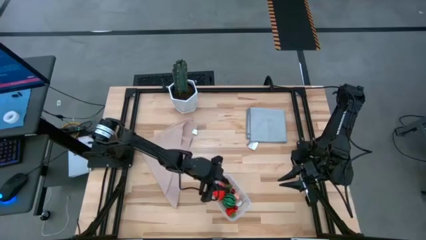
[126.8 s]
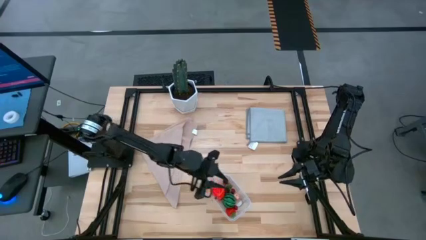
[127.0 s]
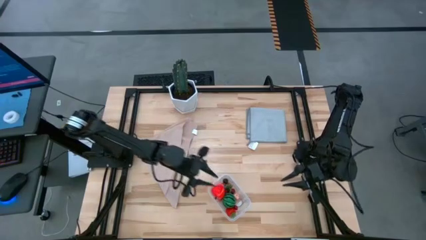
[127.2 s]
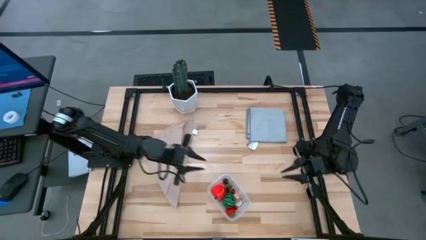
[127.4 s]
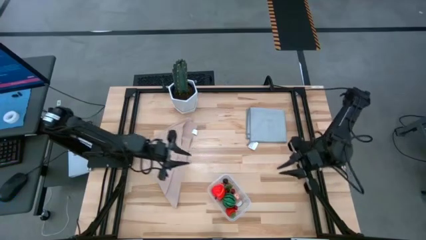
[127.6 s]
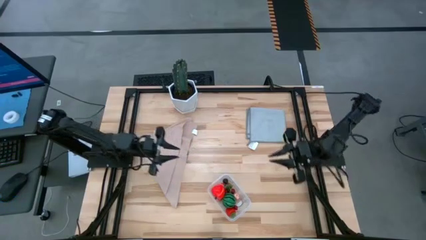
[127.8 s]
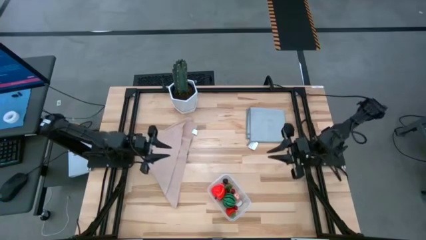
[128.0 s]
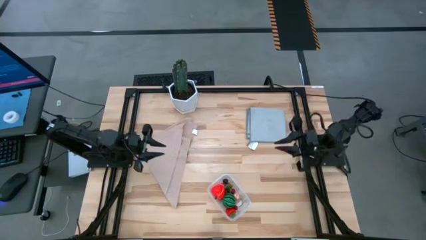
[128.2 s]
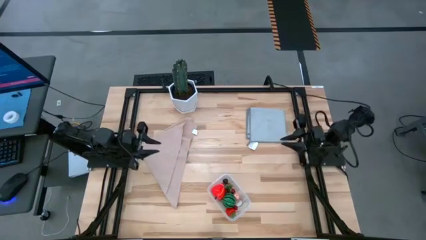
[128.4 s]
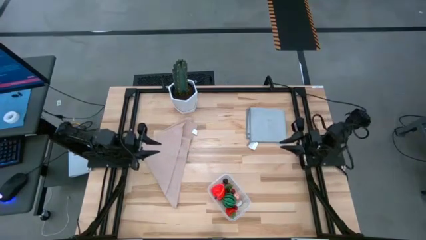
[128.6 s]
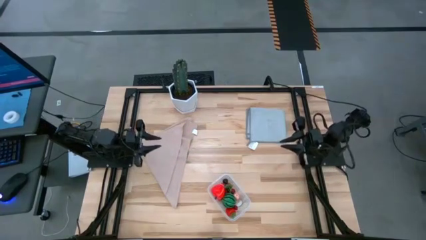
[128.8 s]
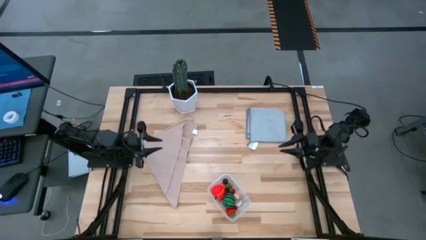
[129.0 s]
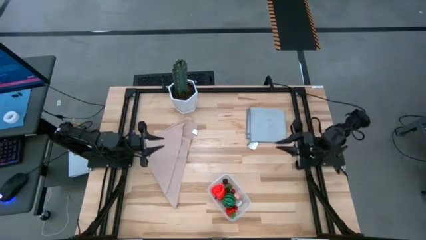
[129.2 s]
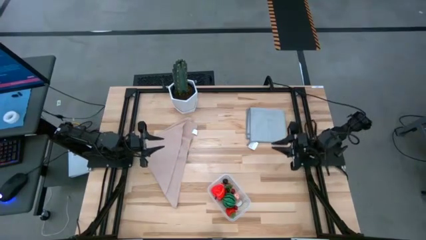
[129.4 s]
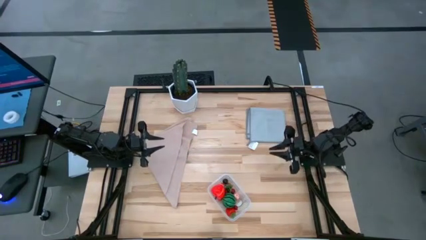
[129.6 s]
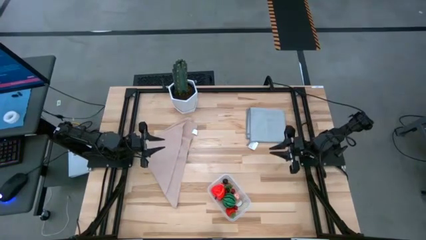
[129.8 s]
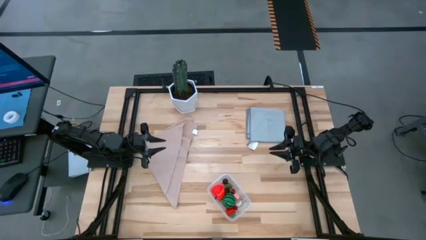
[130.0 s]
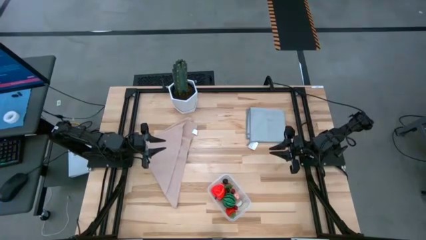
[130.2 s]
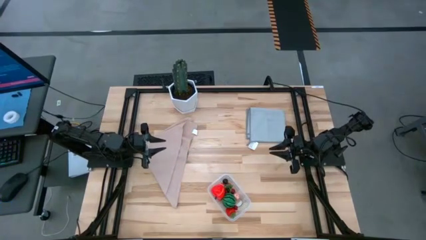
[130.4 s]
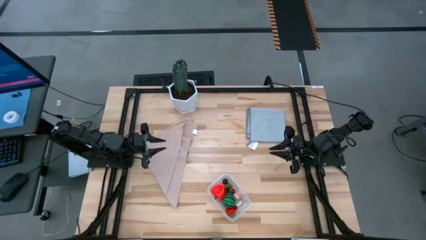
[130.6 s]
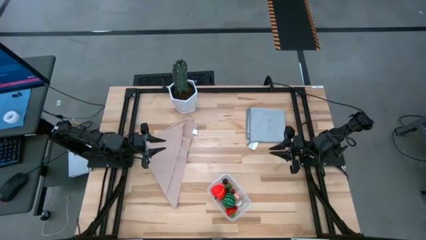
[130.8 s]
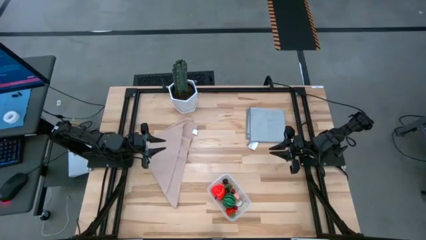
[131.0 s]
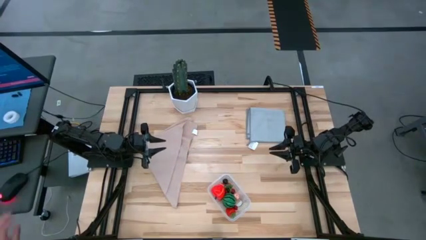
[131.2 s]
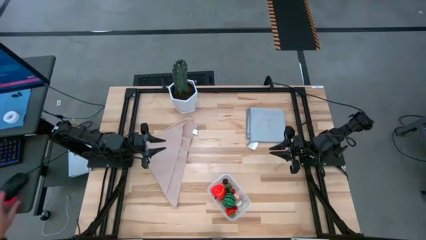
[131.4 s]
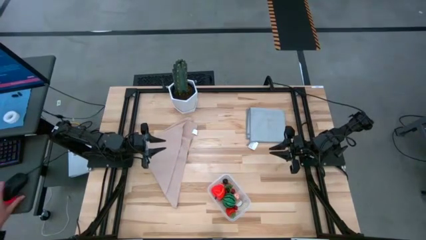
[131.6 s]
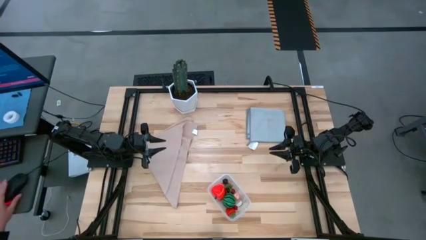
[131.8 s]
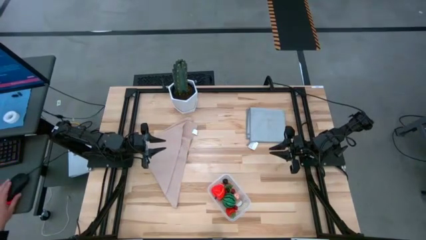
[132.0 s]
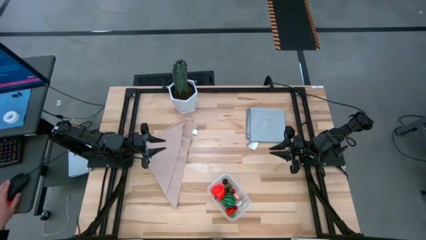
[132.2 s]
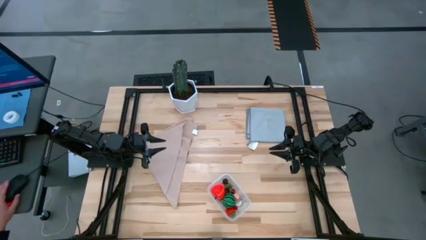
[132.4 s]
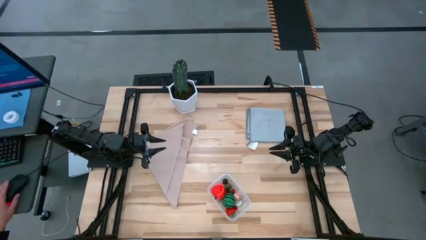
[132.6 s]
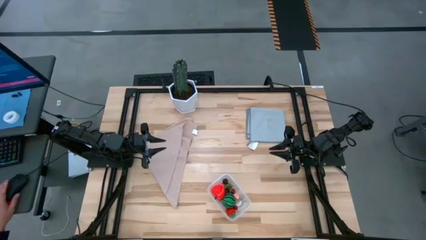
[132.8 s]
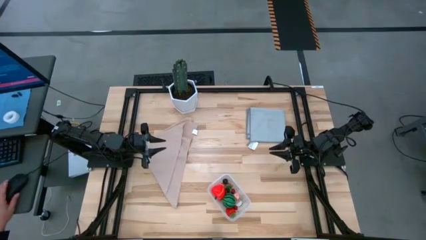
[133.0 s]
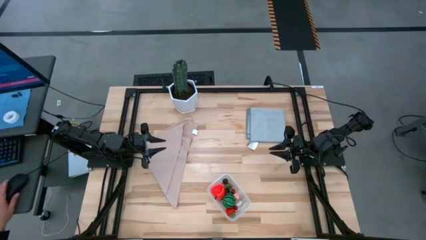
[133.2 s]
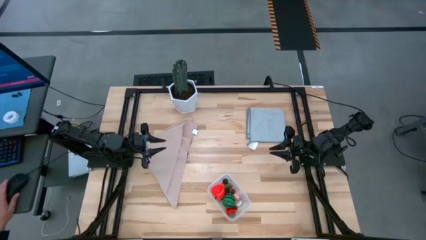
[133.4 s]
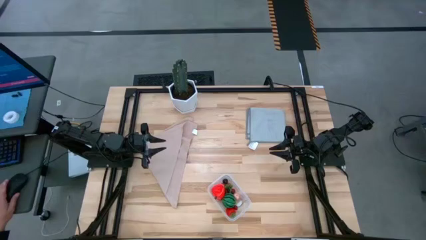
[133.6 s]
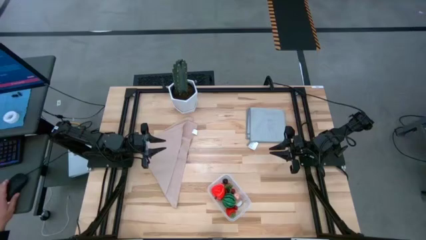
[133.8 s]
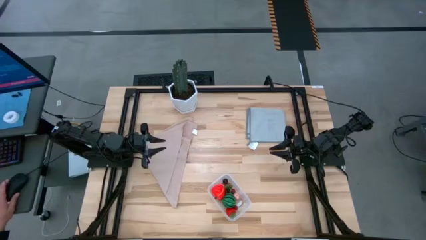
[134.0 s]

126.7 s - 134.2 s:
Task: Pick and placing Produce into tupperware
Return to Home Position

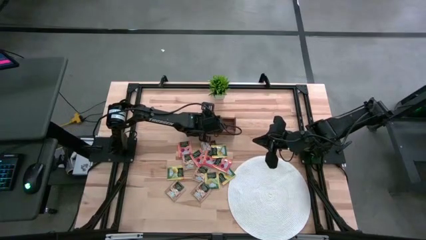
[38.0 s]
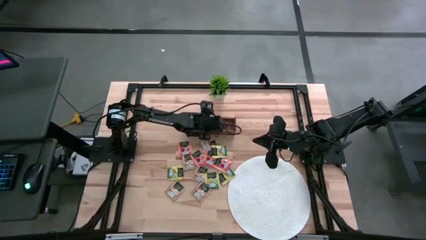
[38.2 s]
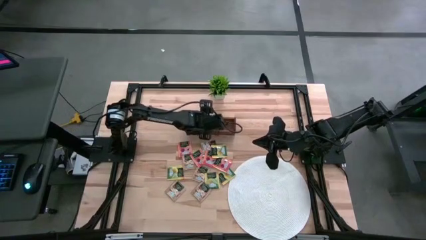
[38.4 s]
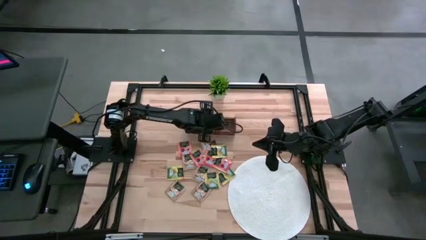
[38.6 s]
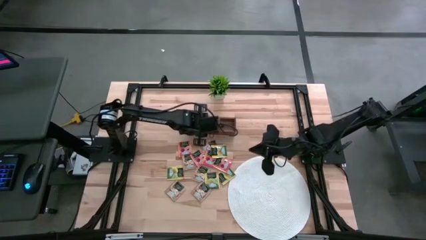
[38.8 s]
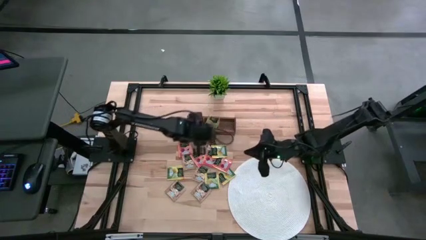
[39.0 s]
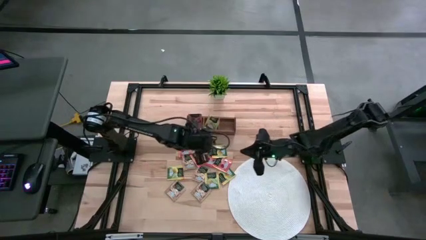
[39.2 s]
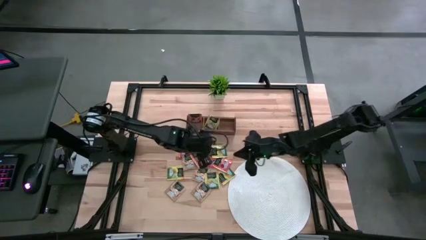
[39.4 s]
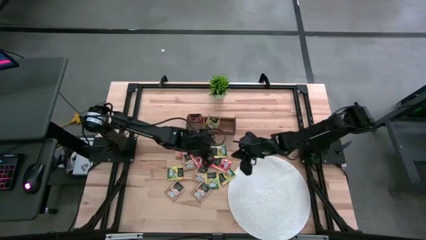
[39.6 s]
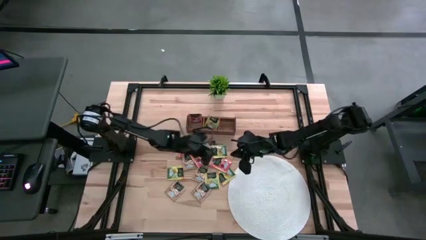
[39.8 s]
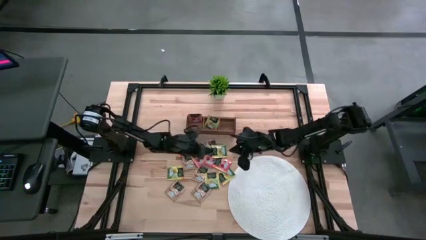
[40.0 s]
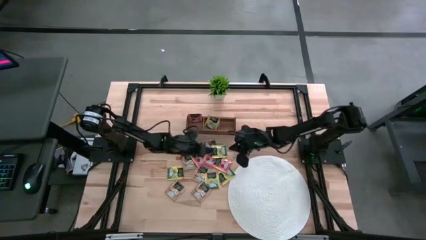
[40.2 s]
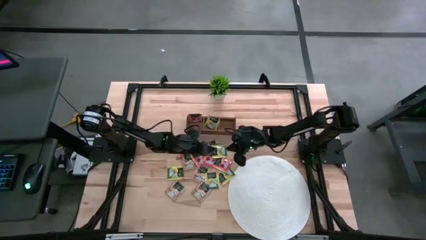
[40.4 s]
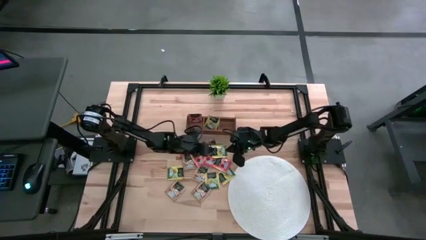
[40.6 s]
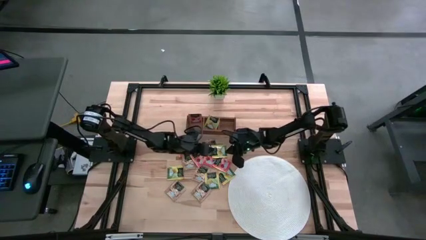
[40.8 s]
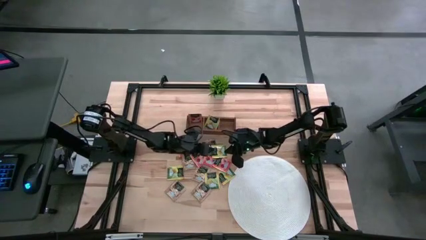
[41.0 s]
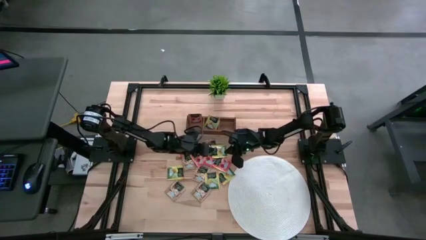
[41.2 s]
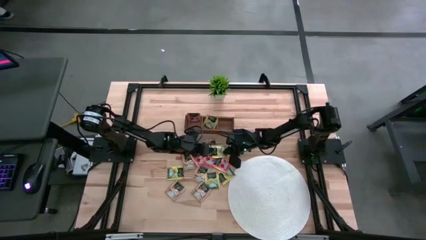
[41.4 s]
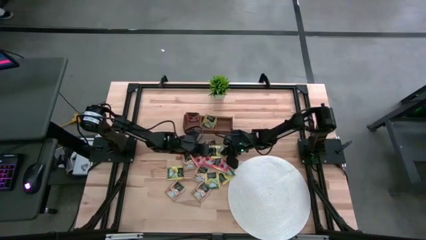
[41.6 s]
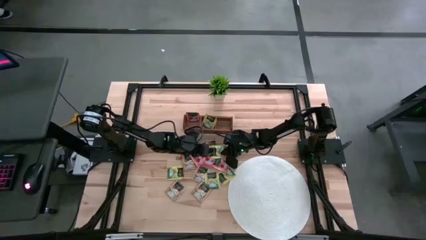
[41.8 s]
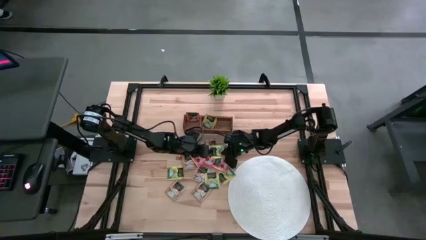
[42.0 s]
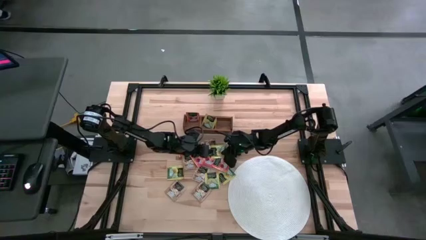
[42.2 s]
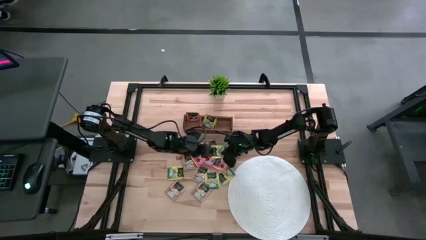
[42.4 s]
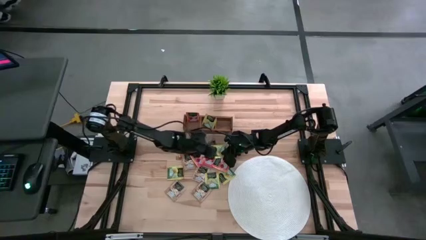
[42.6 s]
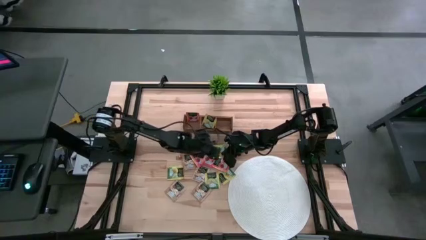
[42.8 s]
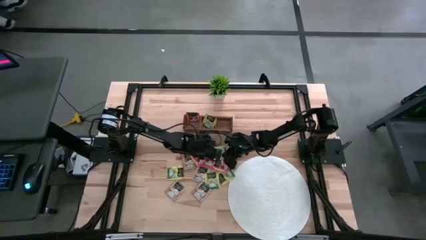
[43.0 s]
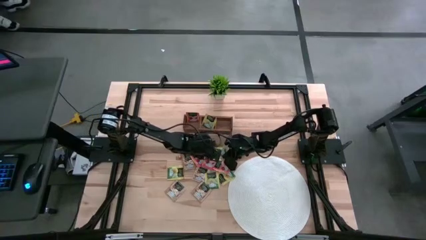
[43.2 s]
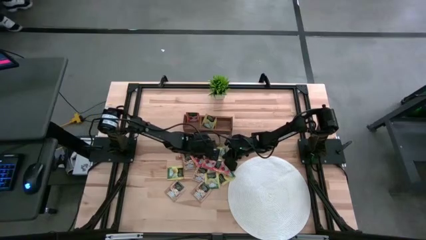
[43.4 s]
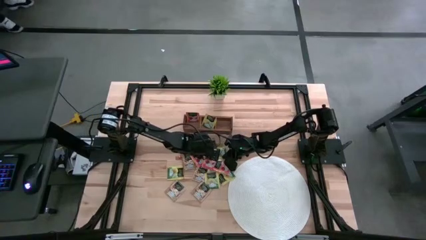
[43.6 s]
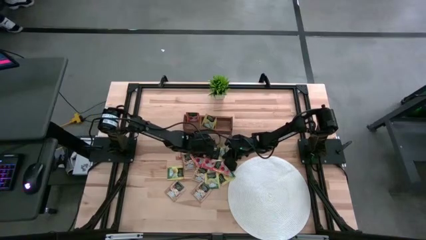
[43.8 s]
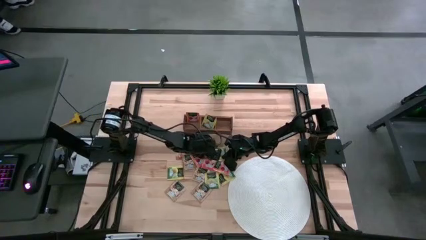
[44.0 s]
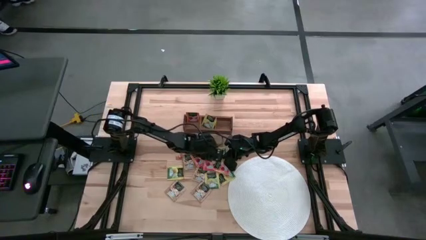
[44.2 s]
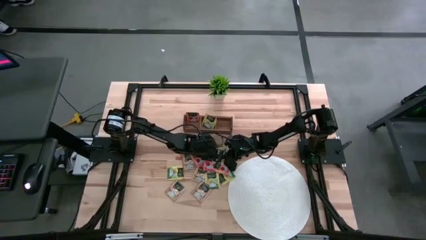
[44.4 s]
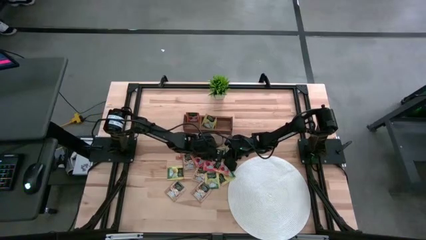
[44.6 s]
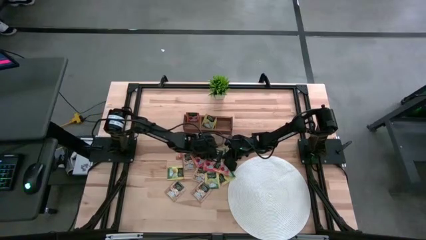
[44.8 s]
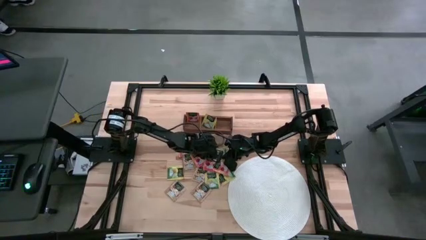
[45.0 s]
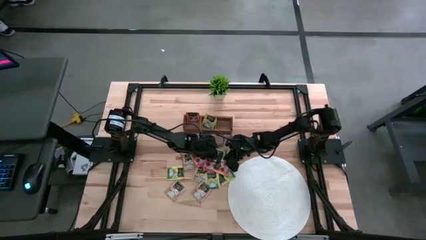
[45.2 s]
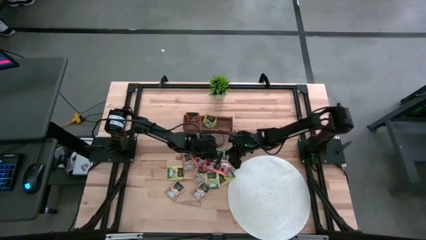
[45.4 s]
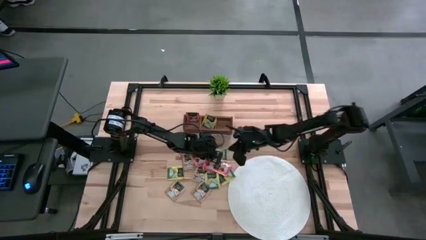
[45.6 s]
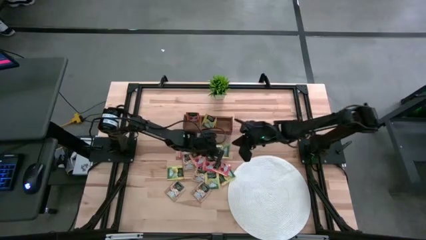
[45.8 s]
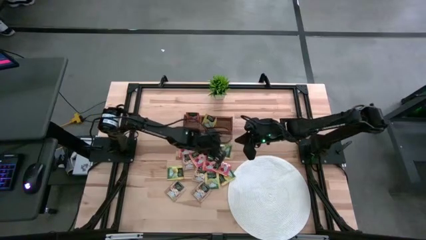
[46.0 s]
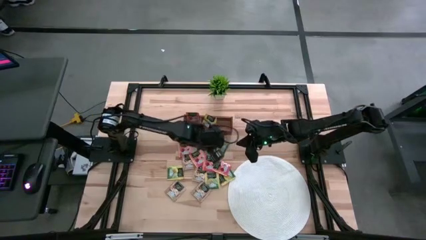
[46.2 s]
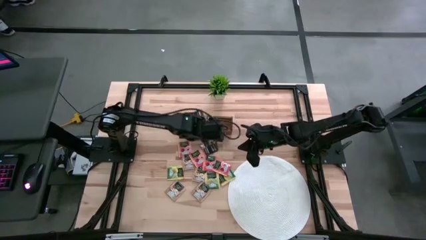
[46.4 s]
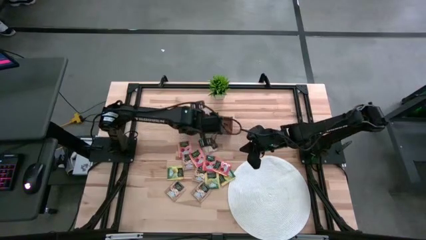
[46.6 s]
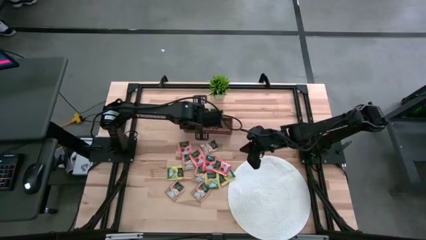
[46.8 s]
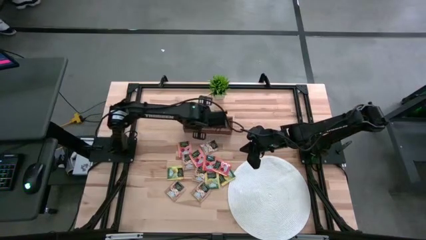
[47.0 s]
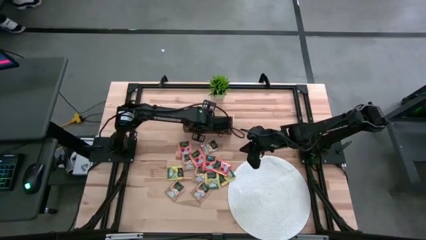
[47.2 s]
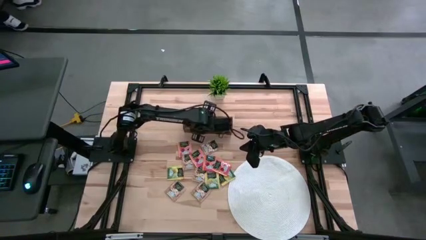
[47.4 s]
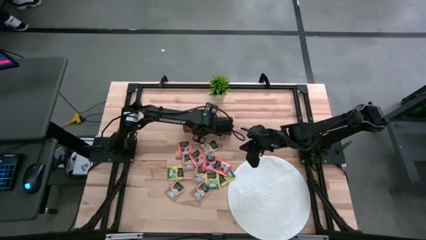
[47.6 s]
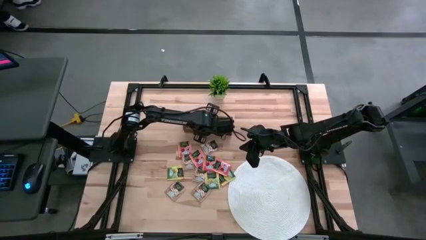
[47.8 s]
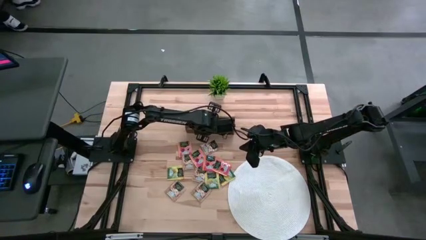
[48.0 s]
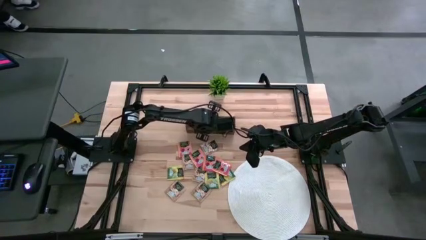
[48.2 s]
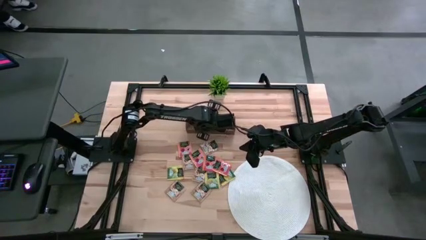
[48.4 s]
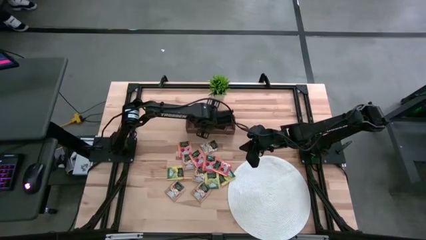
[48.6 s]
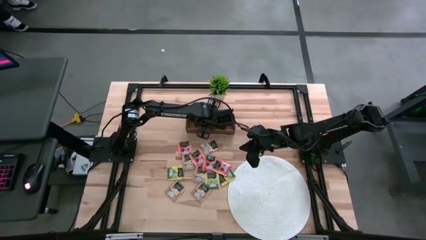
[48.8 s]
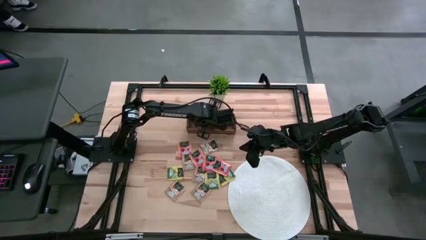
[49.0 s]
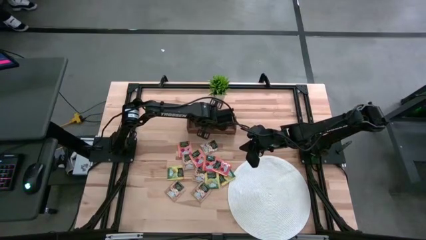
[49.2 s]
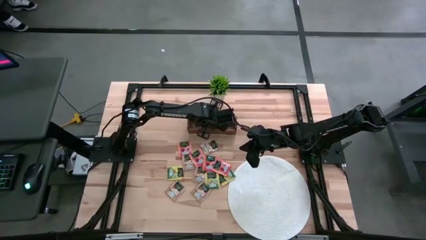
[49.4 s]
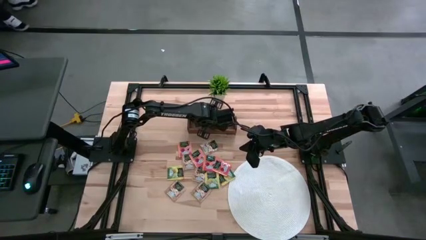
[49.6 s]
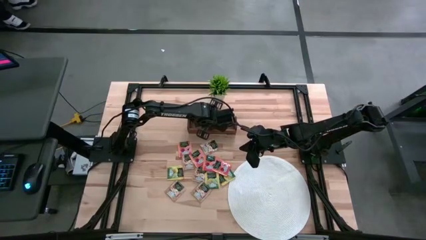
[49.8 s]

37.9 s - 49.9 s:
Task: Pick & Place Tea
Put the yellow tea bag into the middle section of the wooden organizer
